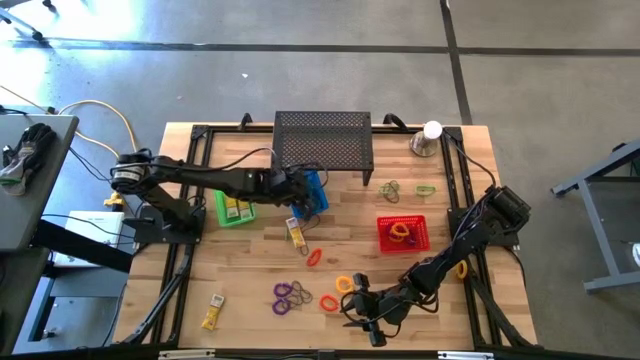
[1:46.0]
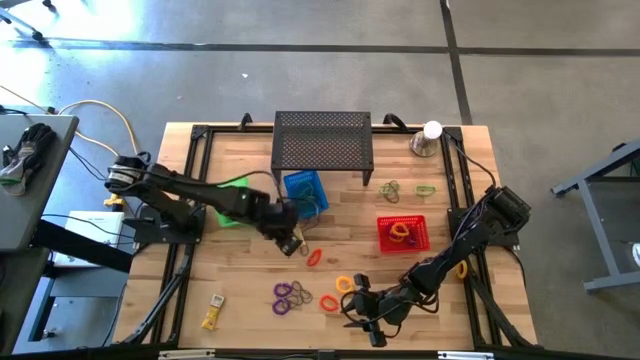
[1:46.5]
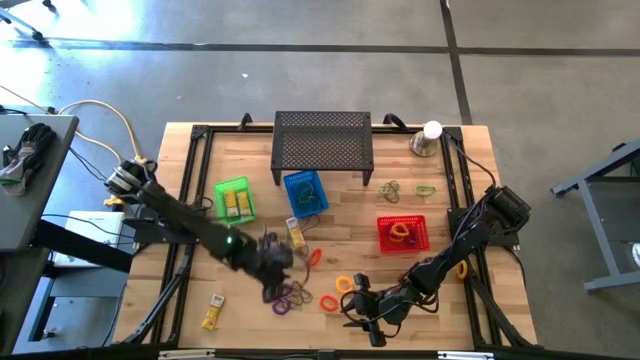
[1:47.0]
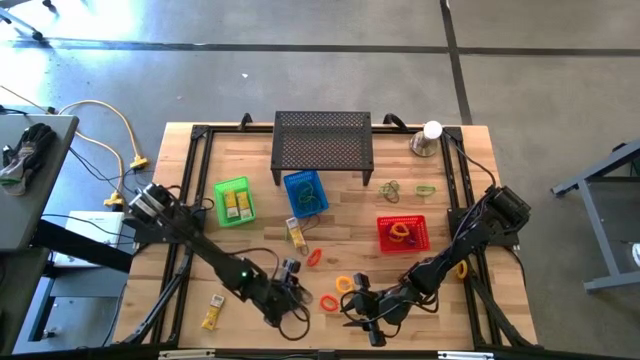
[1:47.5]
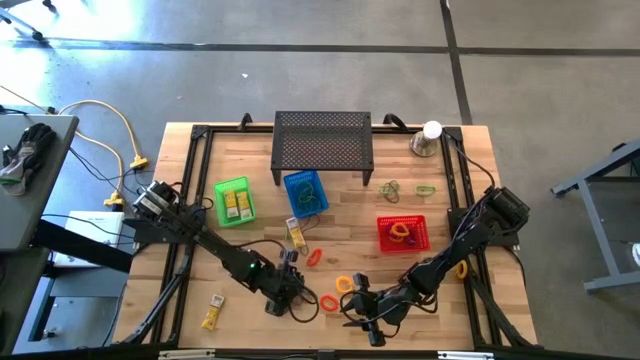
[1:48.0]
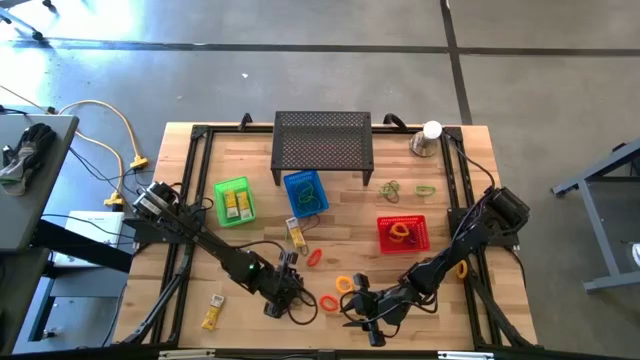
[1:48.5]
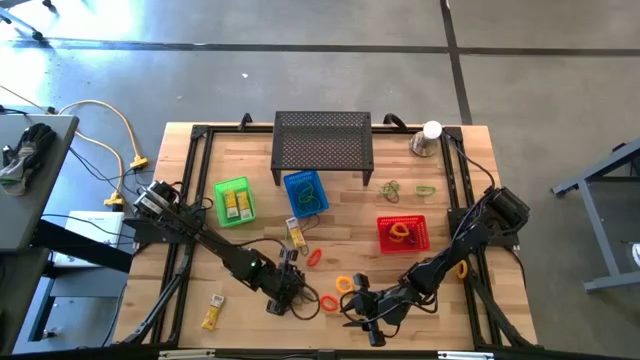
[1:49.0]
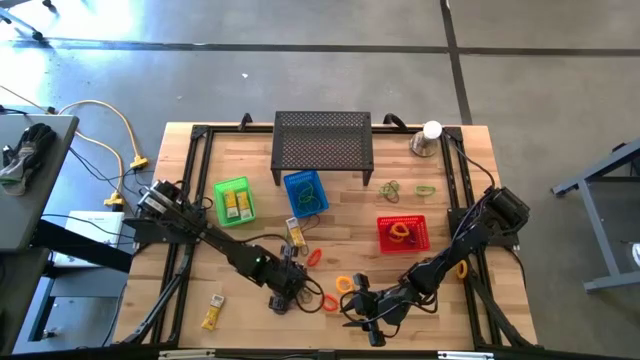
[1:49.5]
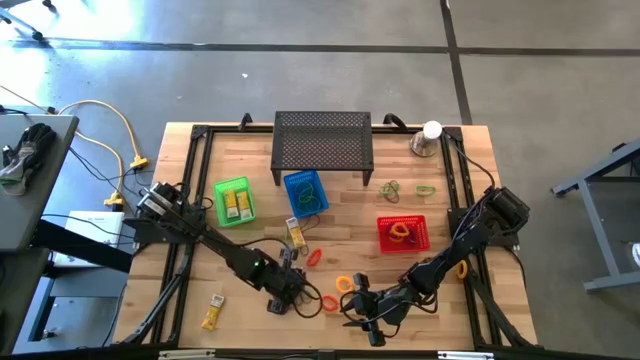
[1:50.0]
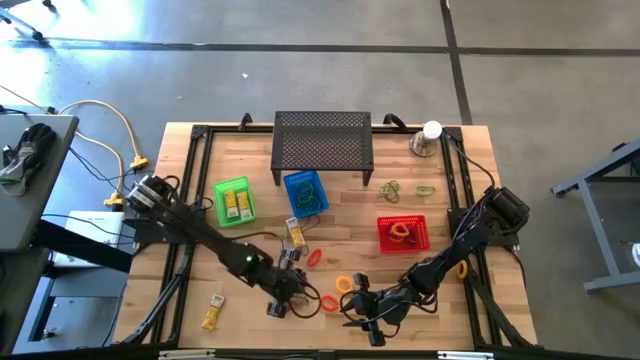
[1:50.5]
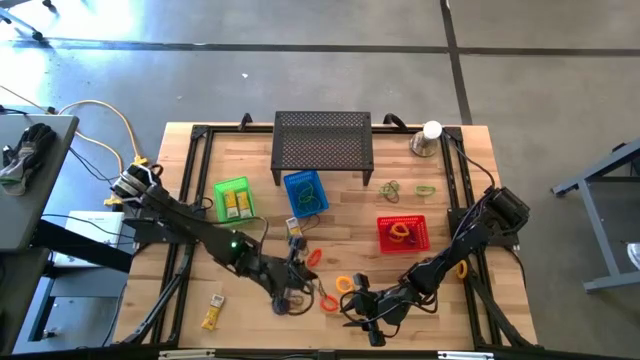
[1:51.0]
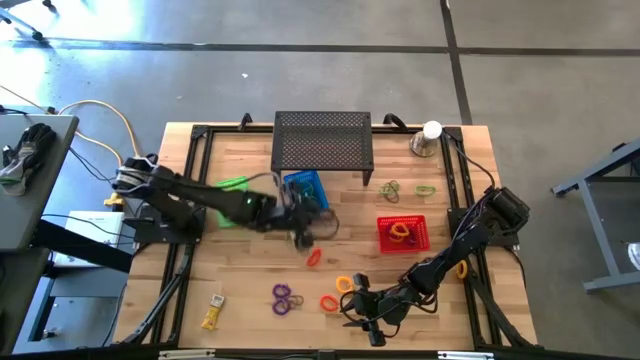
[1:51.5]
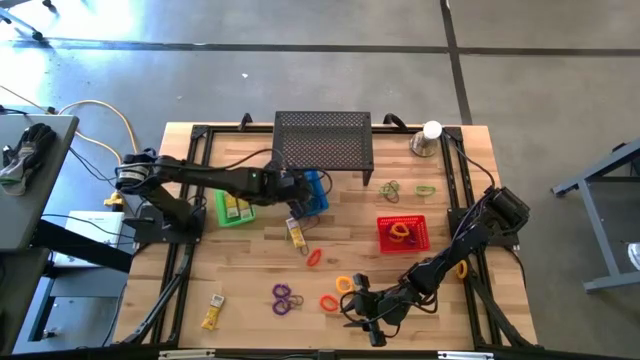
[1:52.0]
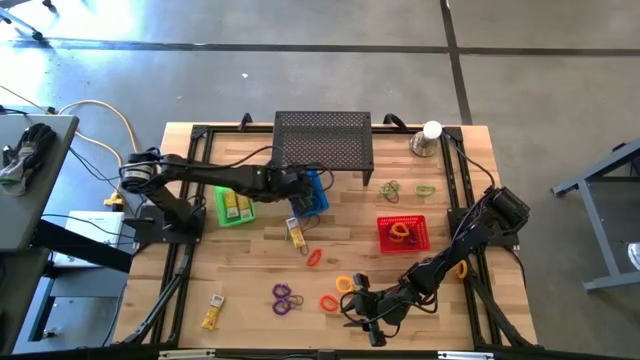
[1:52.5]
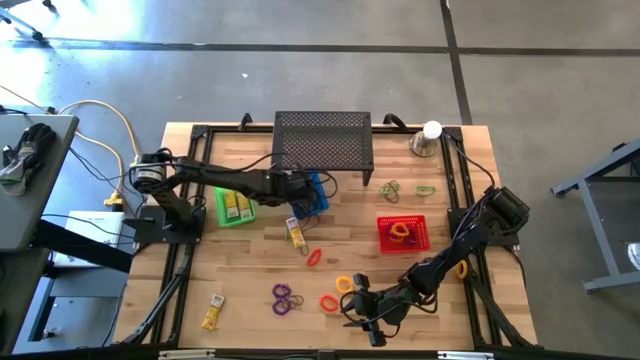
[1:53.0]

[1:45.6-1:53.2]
Task: Pick & Place Office Desk Supplies
Put the violet rubber band into the blue basket

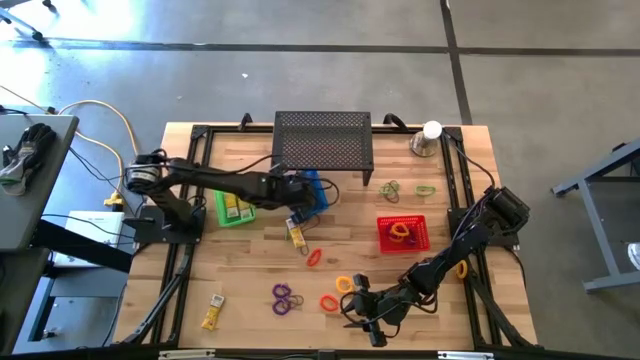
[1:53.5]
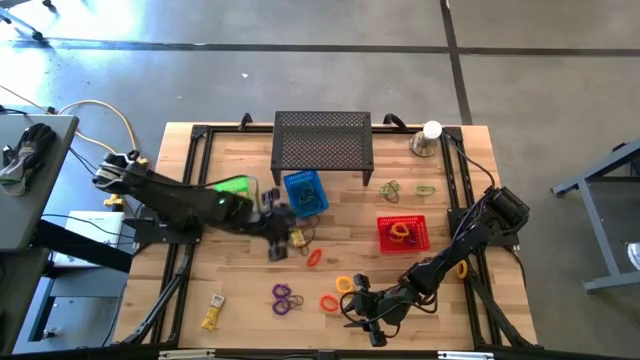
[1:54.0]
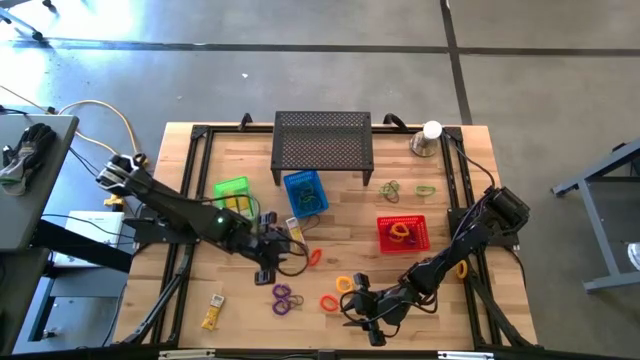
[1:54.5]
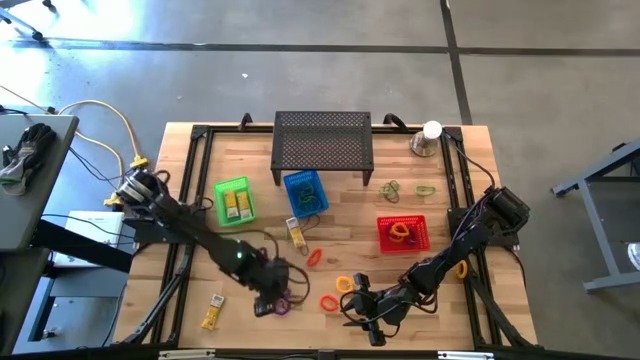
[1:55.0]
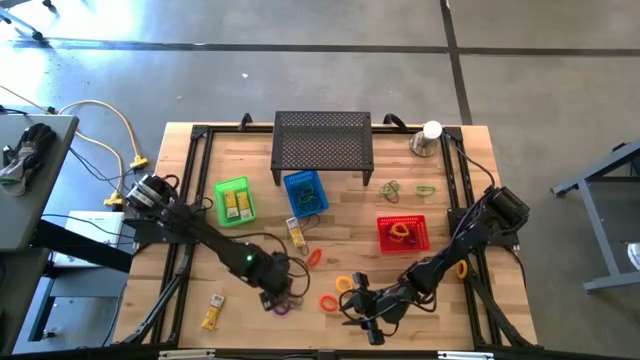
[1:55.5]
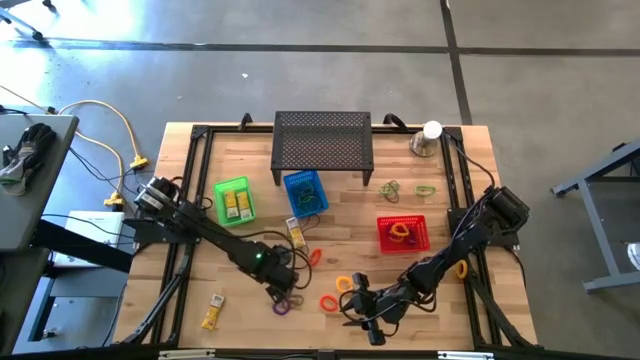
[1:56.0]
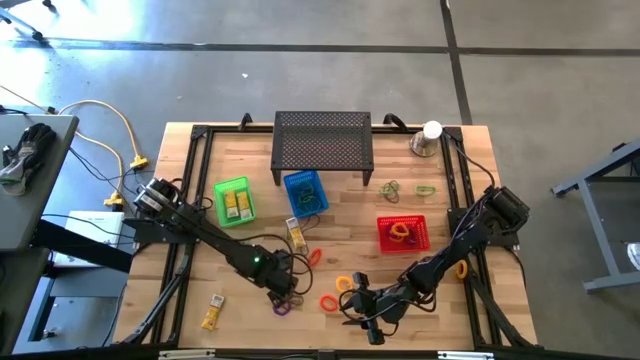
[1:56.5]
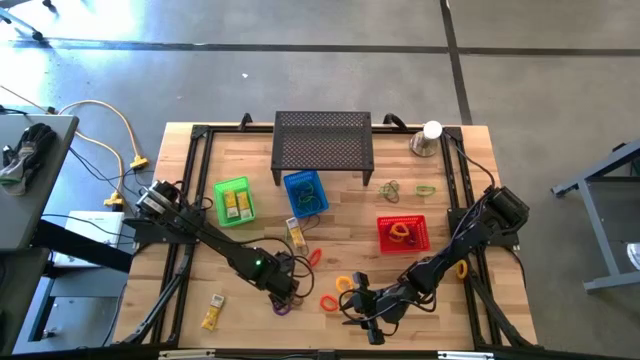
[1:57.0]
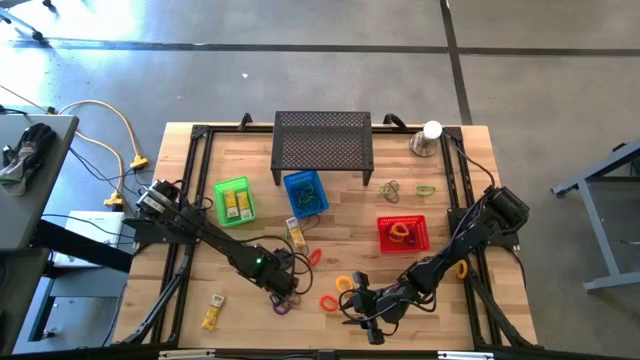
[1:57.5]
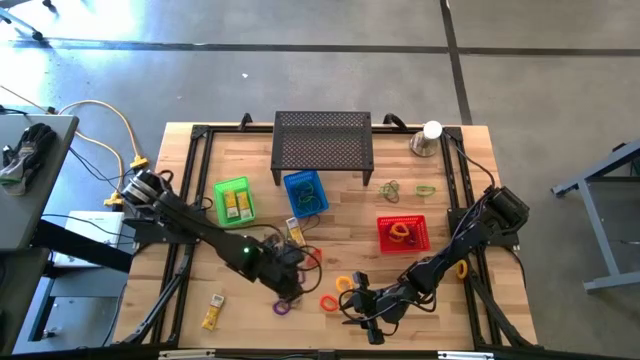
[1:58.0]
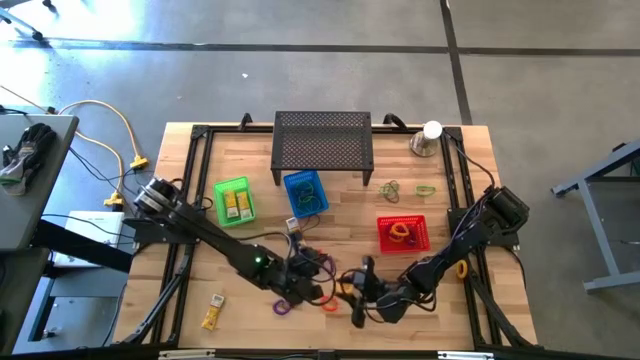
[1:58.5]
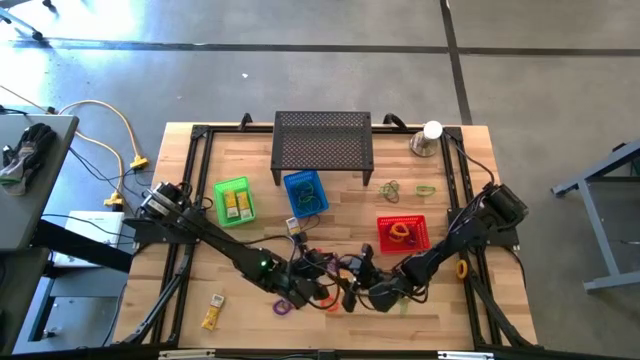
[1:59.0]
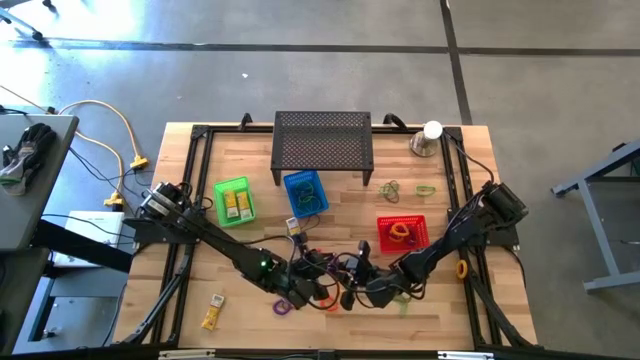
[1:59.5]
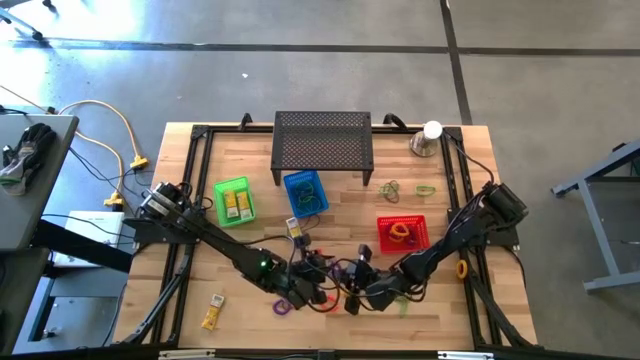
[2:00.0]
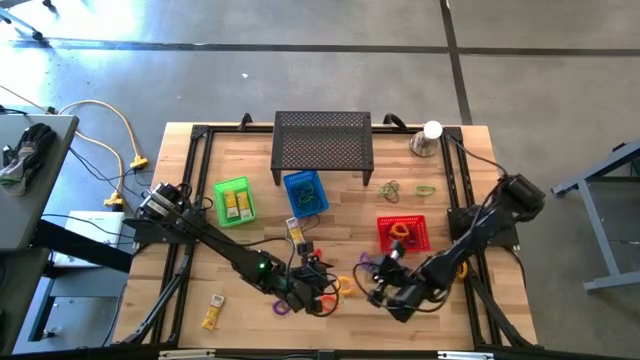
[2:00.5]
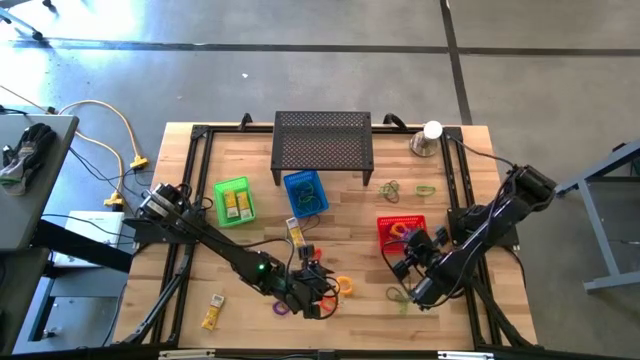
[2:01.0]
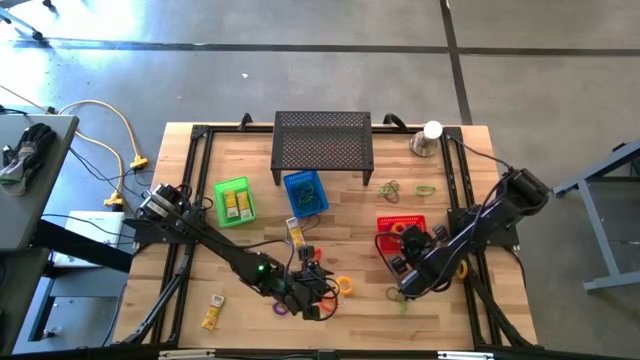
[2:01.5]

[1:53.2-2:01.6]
Put the violet spring keychain into the red basket

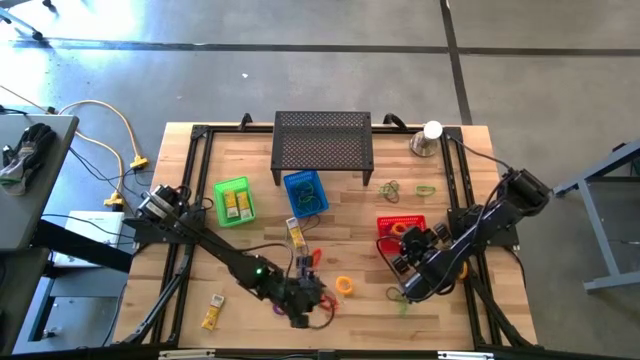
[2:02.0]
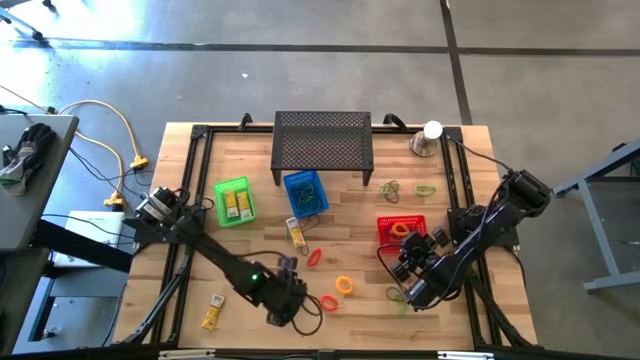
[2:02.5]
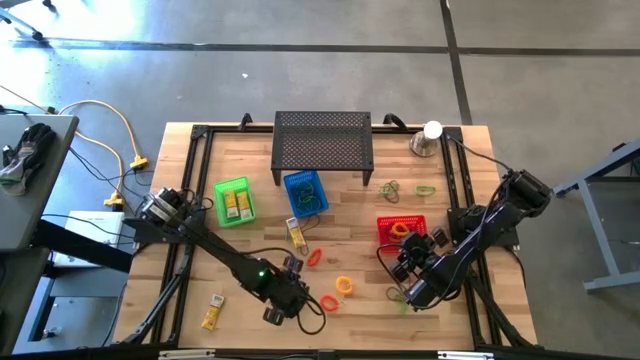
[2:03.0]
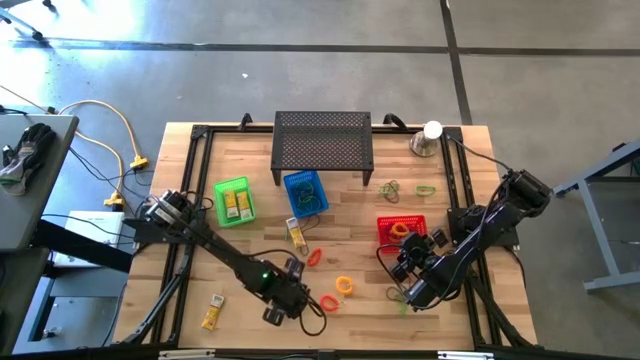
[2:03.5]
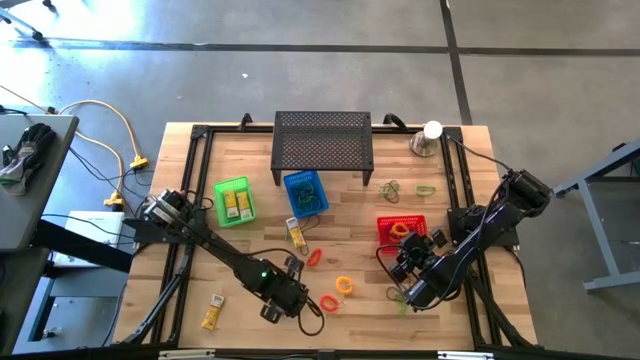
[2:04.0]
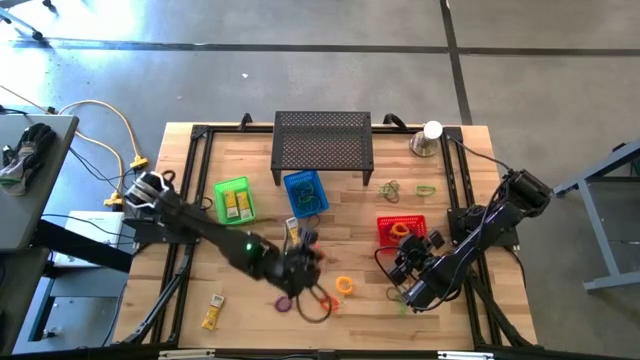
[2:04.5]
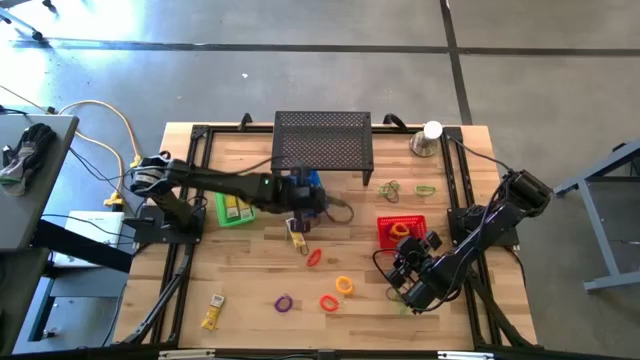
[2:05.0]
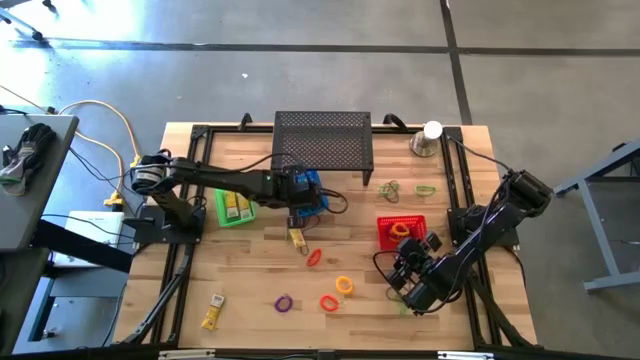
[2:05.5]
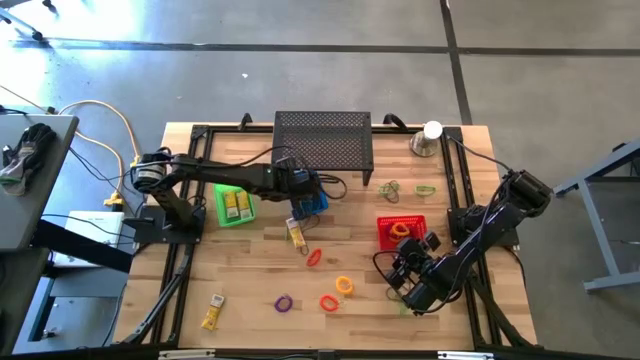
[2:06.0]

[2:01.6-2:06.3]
Put the violet rubber band into the blue basket

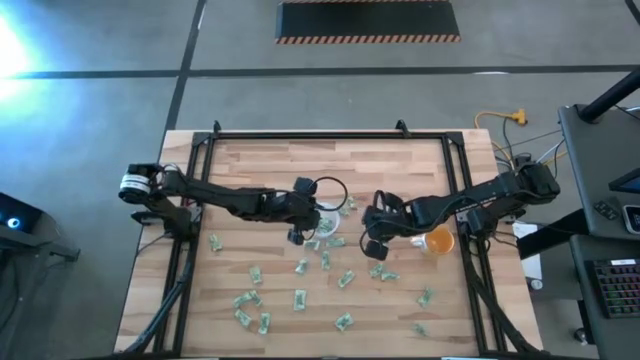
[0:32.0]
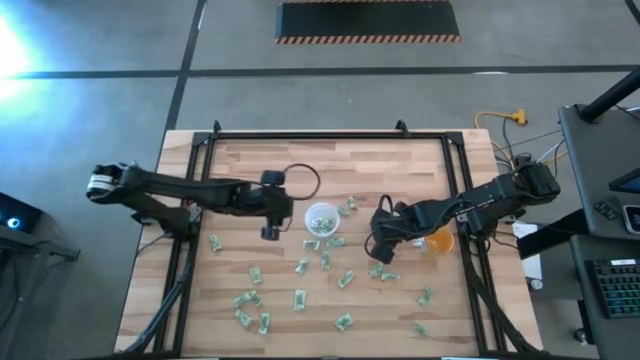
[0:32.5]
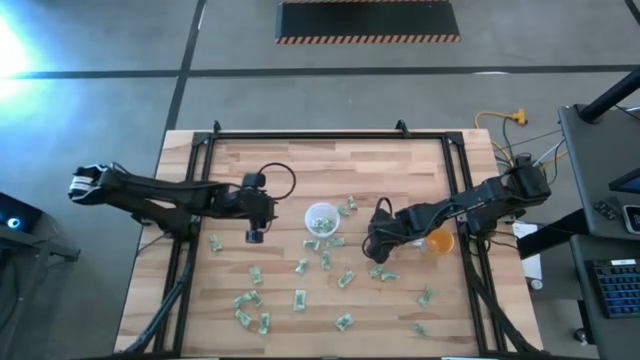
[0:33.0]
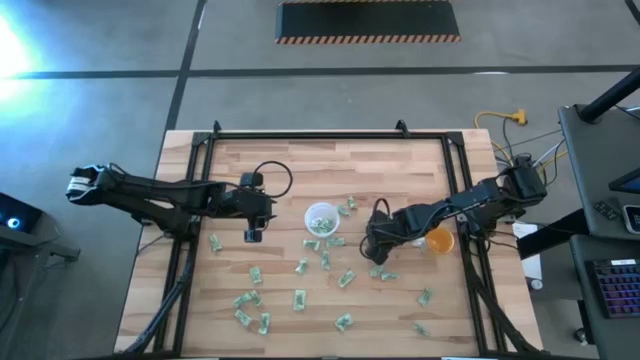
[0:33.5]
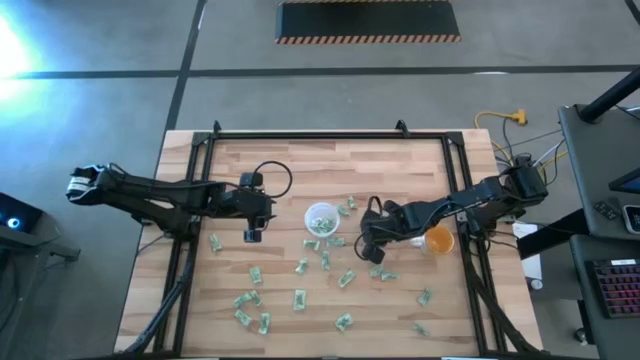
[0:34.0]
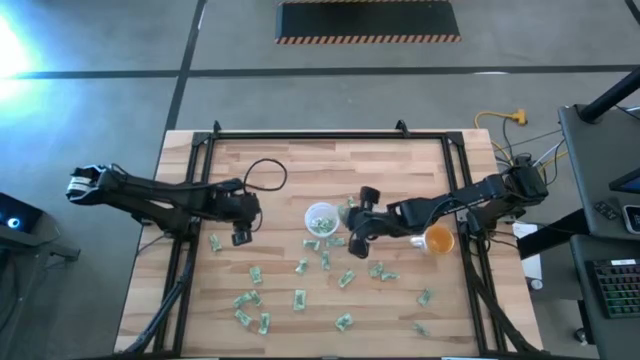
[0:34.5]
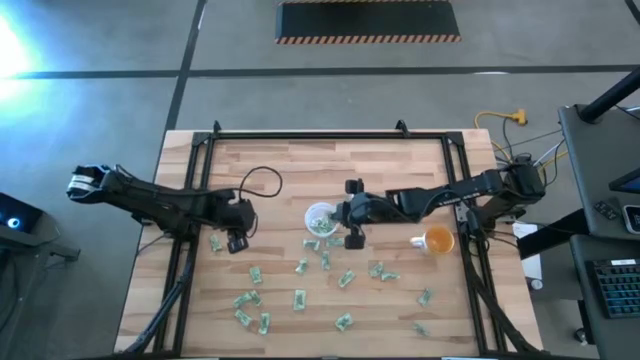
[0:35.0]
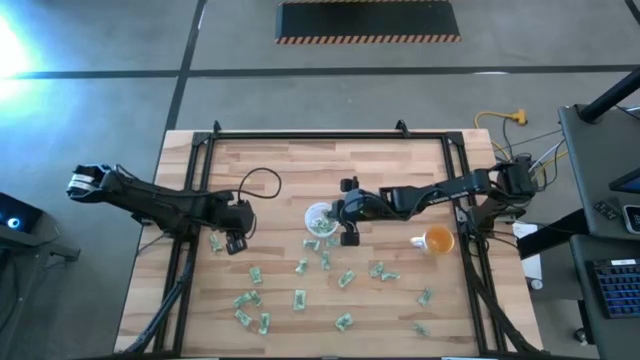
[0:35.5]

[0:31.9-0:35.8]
Task: Pick and place Stevia / Truvia into bins
Put the light green stevia packet into the transparent container
